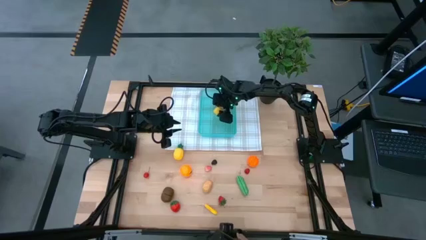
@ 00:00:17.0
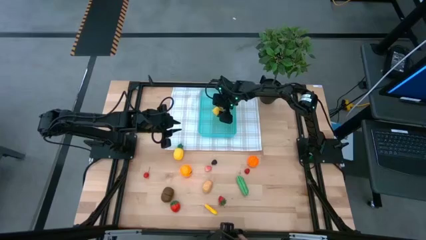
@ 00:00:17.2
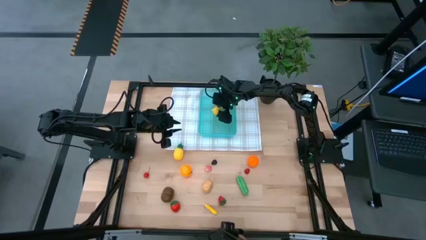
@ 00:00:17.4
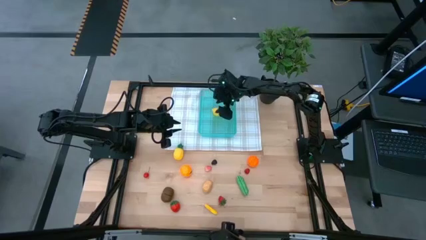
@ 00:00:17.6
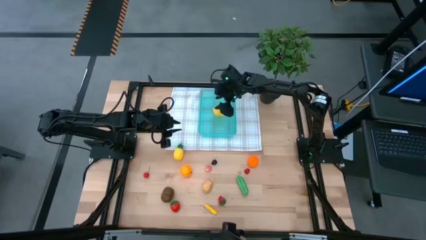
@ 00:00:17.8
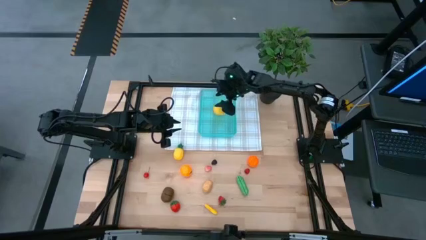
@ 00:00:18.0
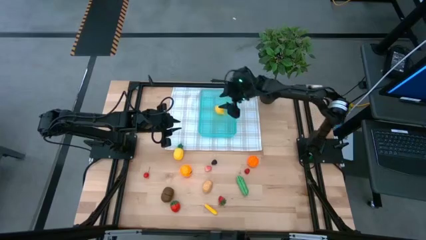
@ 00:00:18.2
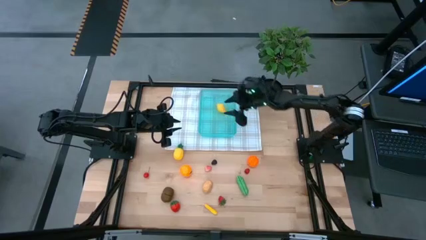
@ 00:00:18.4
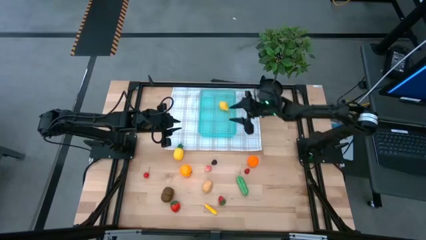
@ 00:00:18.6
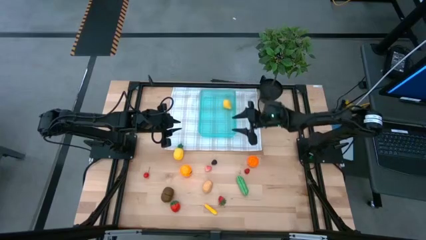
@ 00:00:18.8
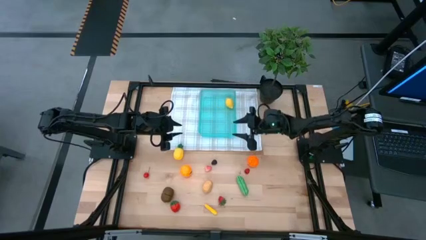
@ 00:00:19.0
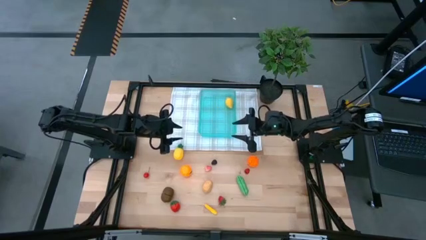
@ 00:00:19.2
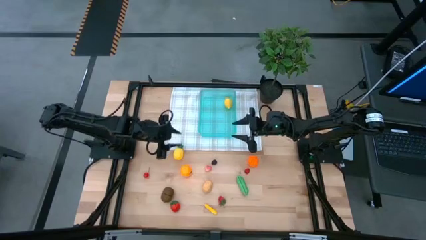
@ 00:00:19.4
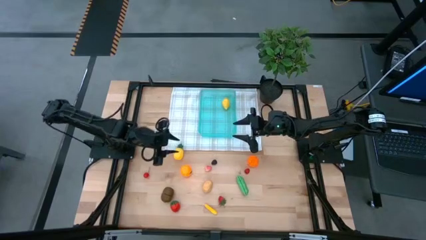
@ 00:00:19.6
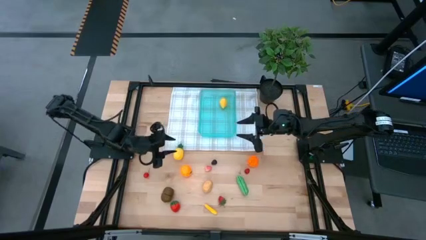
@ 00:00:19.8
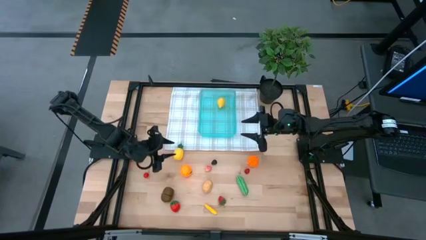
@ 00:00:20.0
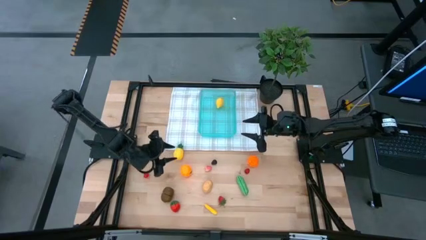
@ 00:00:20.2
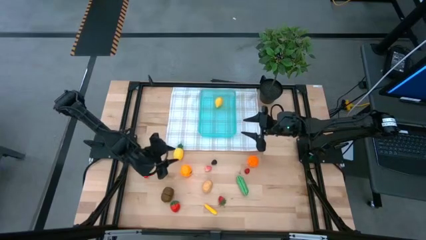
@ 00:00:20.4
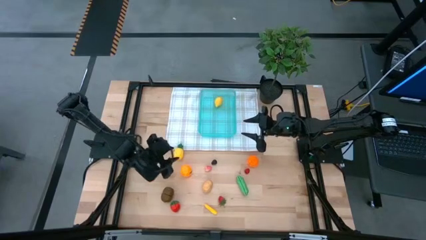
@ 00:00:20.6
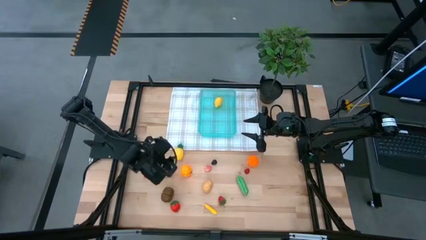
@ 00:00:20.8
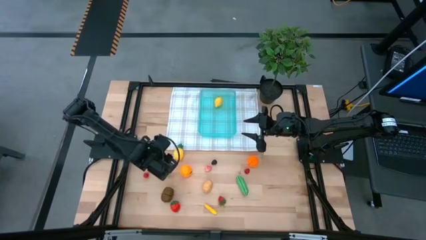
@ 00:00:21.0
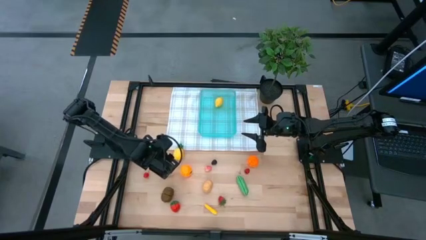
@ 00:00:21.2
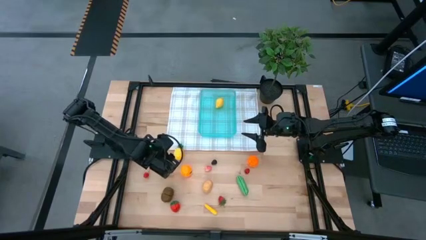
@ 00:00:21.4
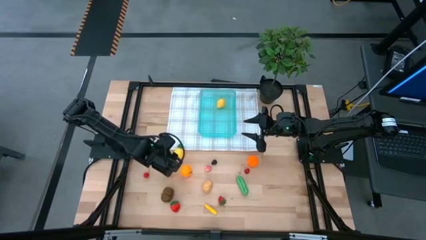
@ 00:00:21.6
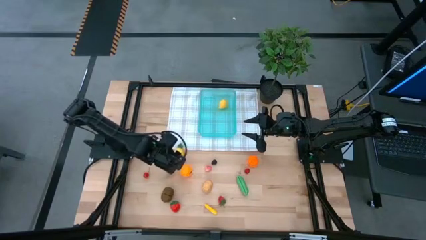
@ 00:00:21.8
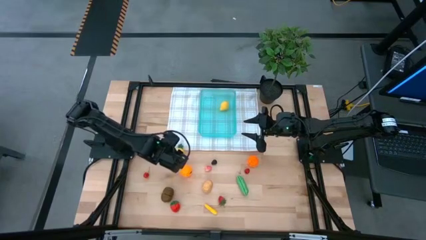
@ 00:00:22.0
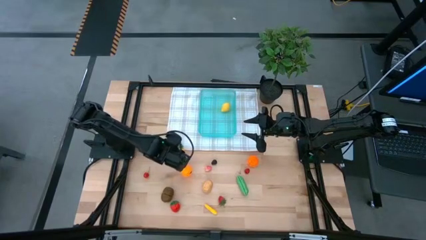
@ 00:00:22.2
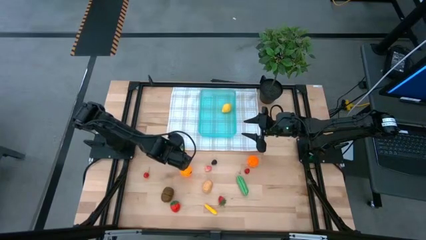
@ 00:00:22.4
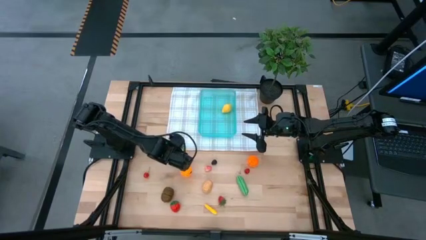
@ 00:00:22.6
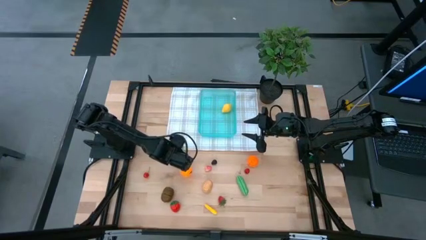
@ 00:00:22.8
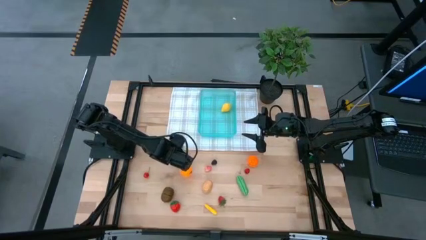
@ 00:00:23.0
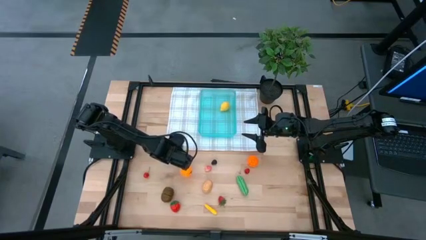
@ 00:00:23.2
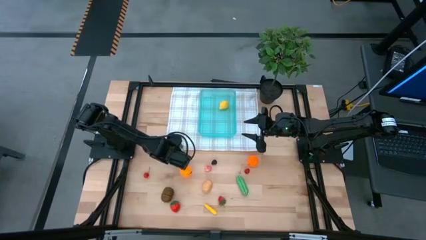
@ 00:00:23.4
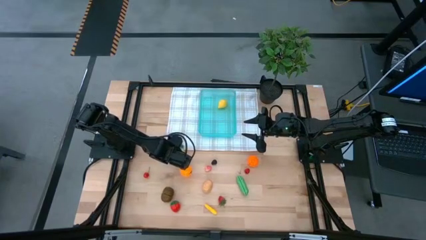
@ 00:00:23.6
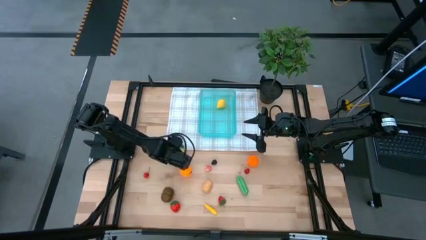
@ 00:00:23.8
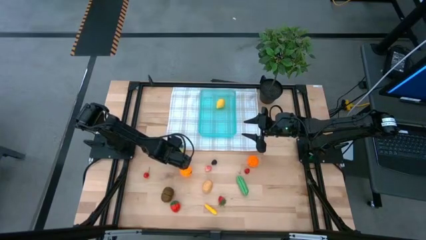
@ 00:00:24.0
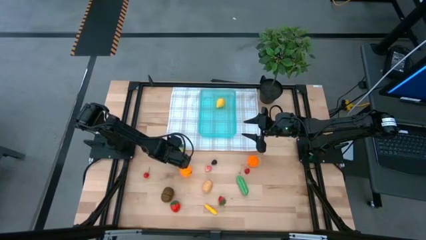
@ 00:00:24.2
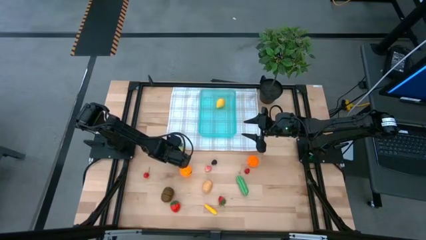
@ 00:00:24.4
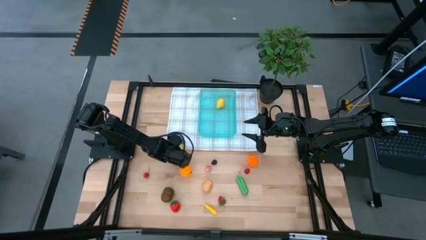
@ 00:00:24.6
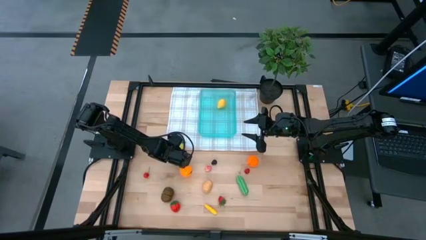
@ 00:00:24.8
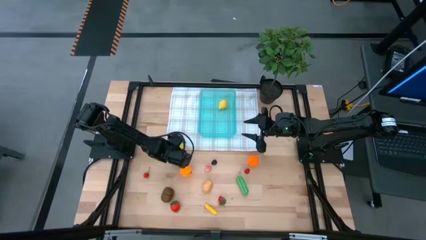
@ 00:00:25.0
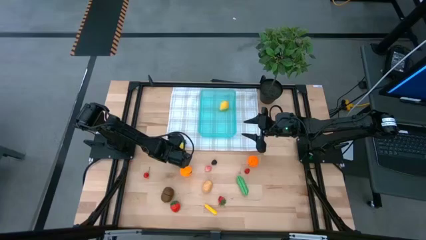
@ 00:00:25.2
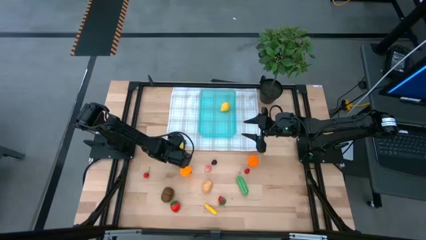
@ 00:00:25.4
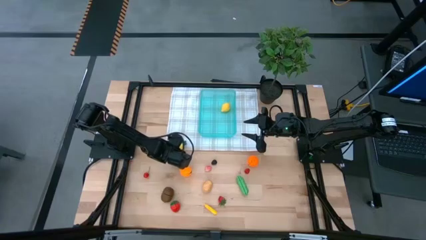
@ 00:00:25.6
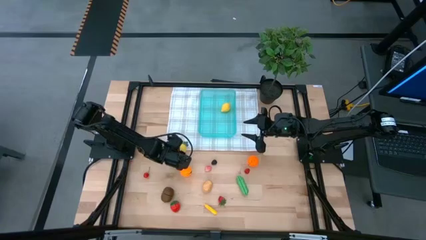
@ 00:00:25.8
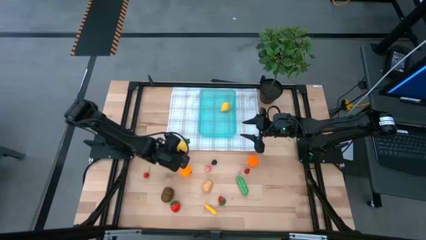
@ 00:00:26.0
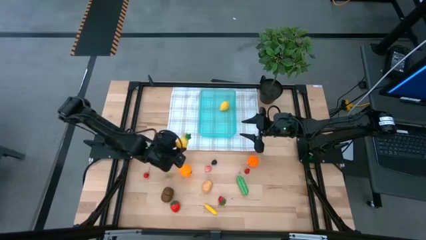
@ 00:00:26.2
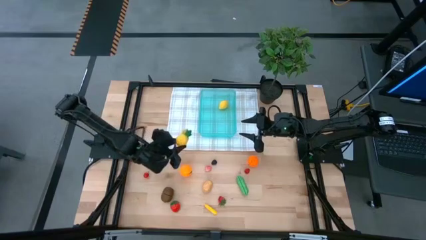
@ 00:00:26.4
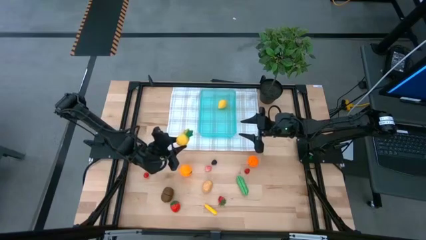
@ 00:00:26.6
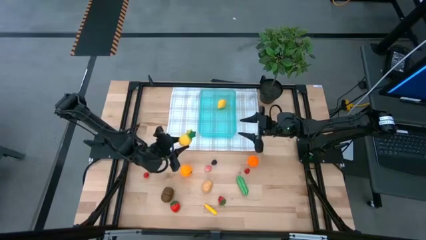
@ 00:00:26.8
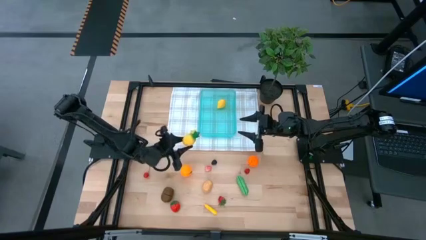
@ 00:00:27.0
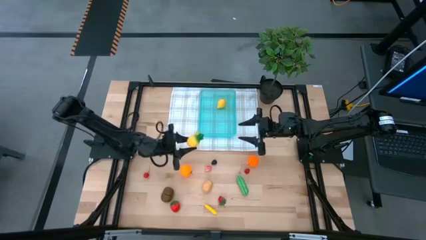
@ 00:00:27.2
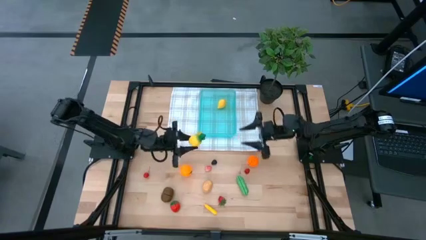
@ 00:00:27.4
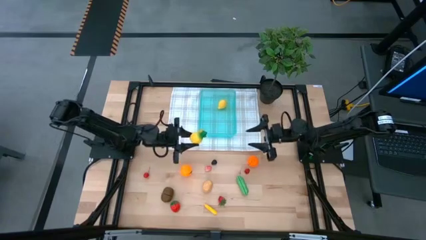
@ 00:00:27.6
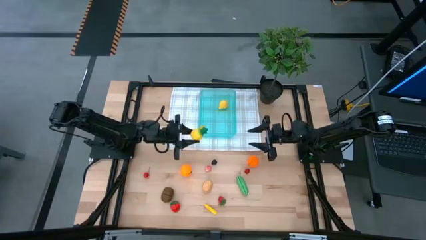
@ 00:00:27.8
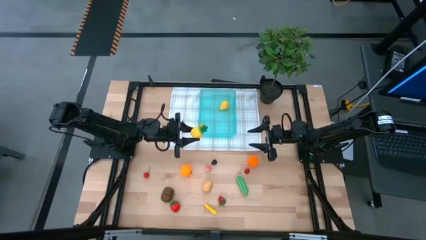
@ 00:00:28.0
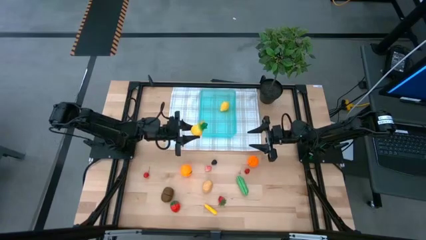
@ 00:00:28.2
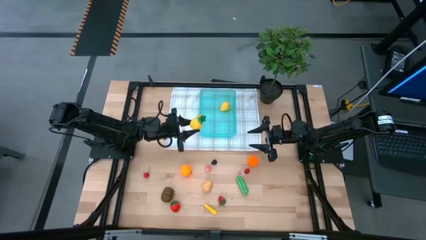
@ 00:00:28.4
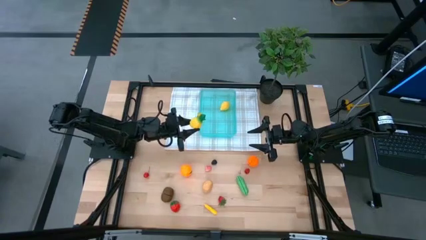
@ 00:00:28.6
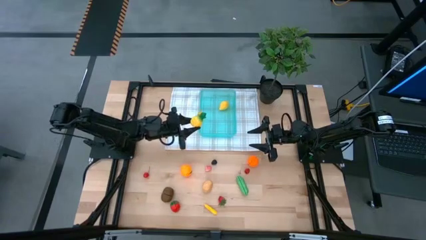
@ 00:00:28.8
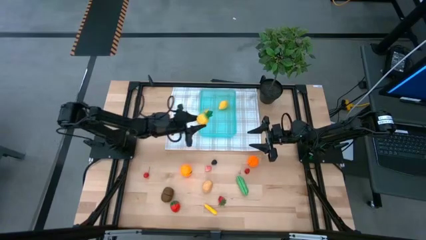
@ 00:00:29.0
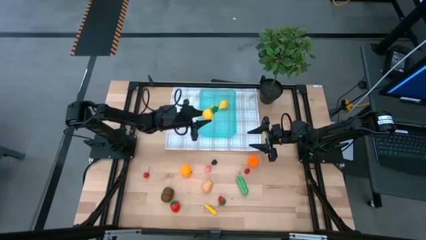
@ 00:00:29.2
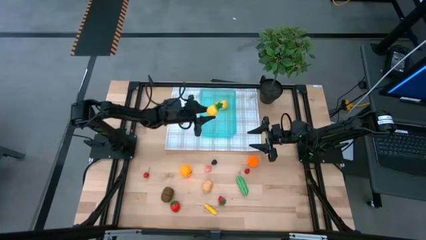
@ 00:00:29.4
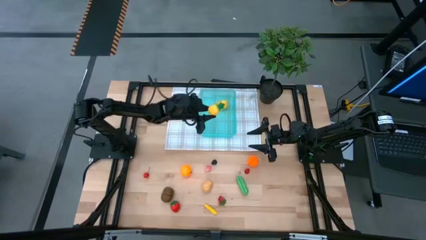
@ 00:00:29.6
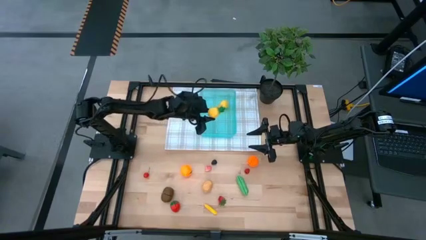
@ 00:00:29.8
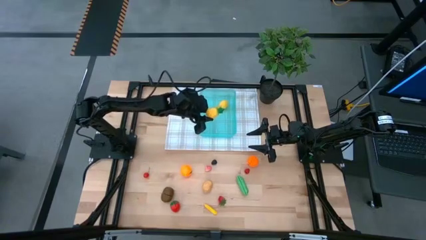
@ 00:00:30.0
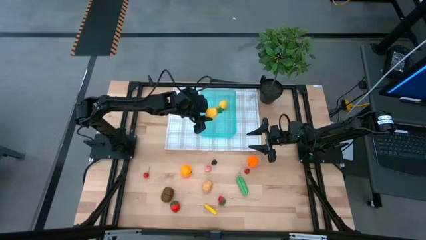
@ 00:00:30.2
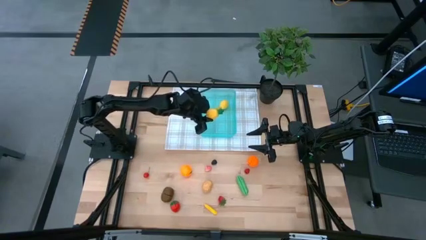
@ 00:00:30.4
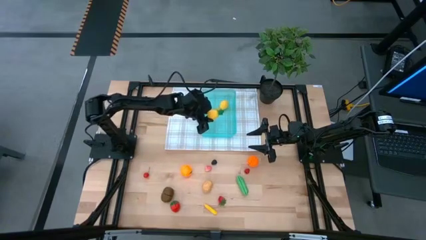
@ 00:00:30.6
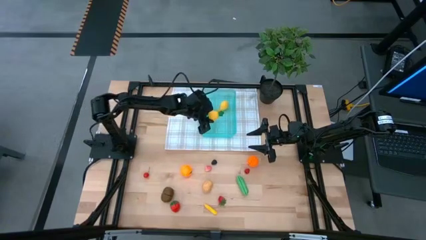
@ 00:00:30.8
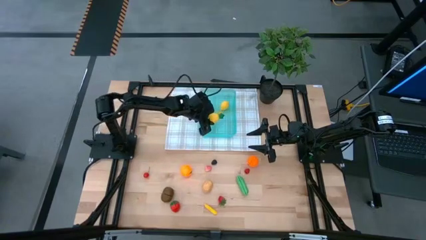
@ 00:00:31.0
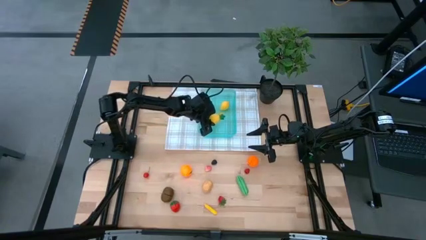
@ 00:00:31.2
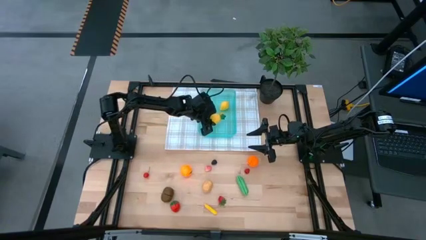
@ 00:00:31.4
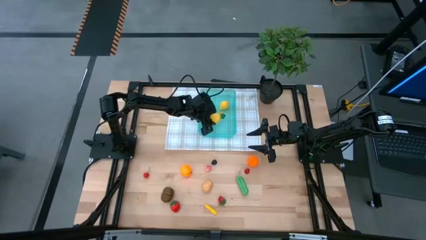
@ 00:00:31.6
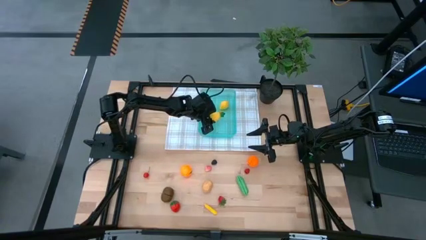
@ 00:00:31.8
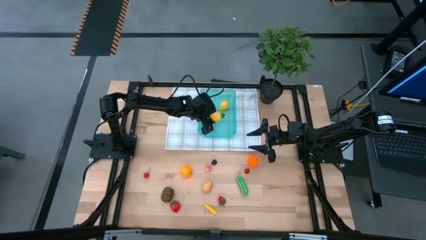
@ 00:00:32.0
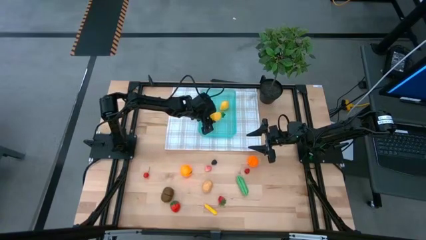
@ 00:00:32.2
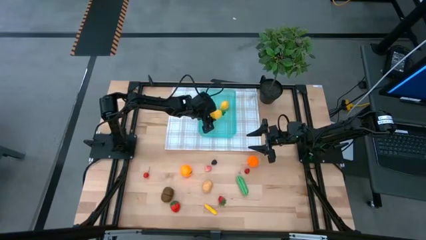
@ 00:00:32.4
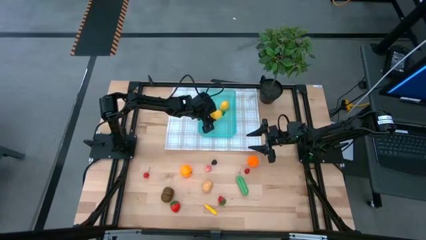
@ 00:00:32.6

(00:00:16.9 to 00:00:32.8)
Task: Pick and placing Produce into tupperware
Put the yellow pineapple into the green bin
